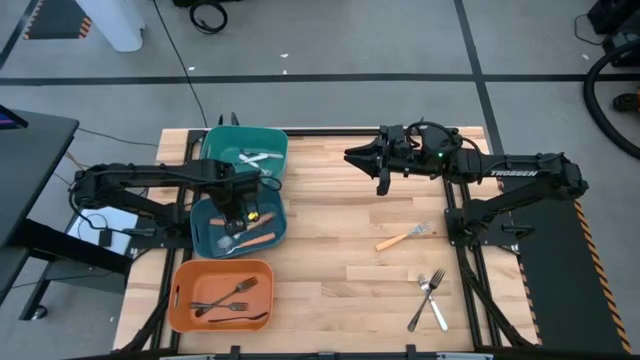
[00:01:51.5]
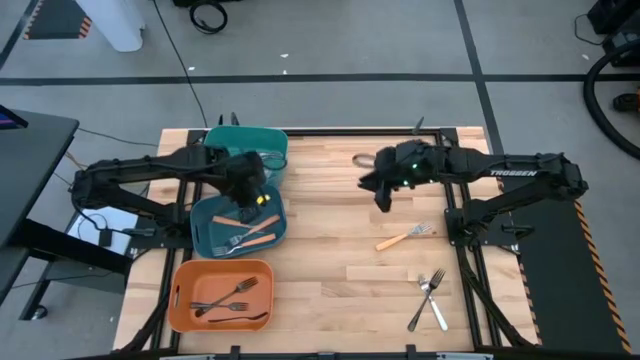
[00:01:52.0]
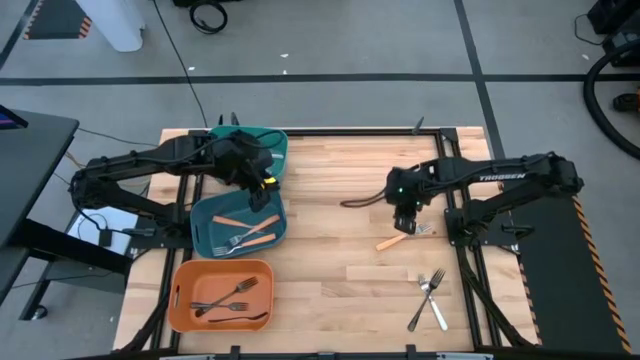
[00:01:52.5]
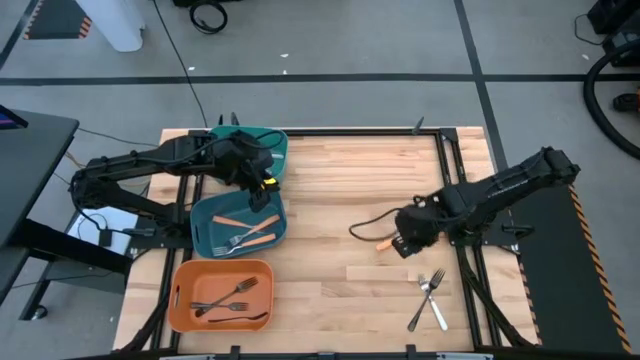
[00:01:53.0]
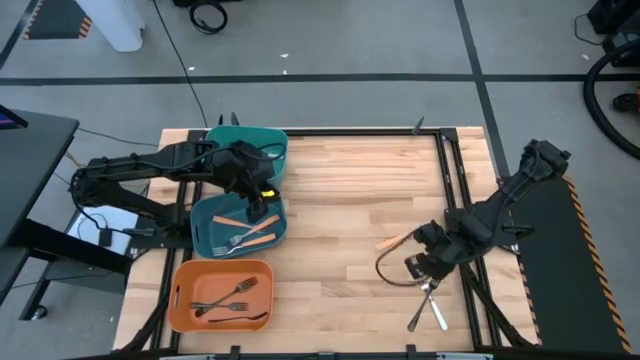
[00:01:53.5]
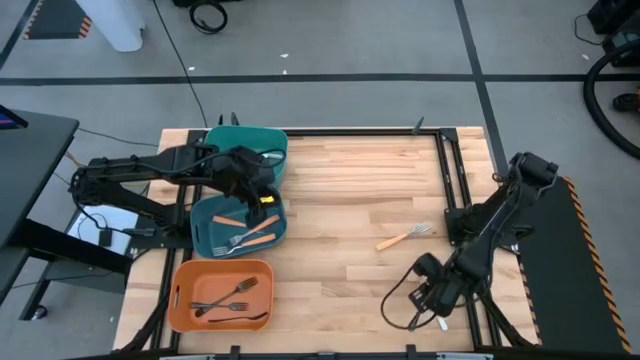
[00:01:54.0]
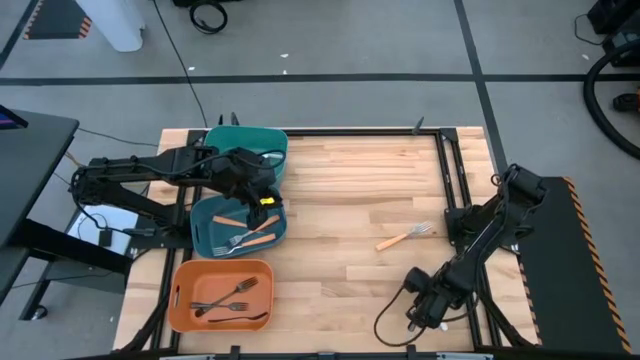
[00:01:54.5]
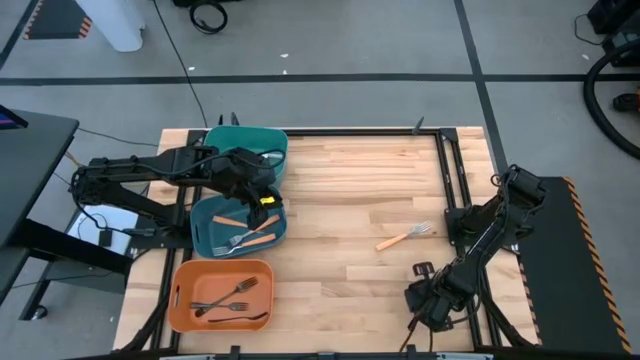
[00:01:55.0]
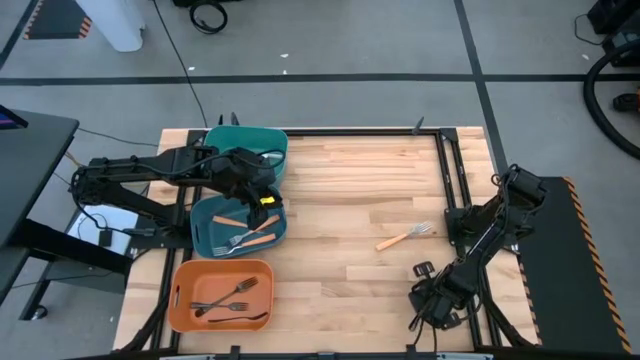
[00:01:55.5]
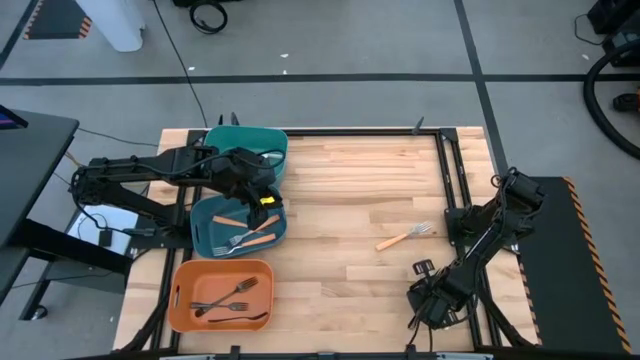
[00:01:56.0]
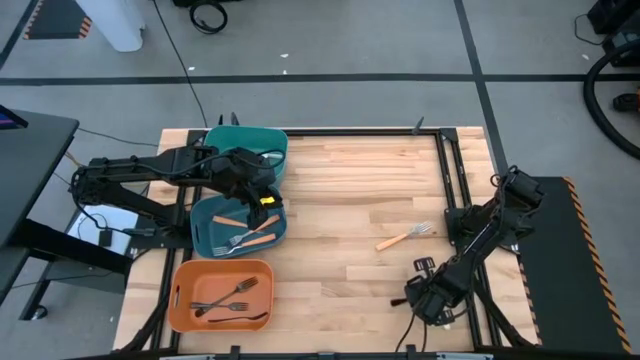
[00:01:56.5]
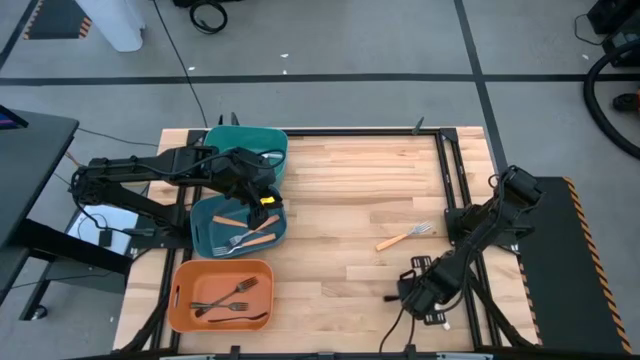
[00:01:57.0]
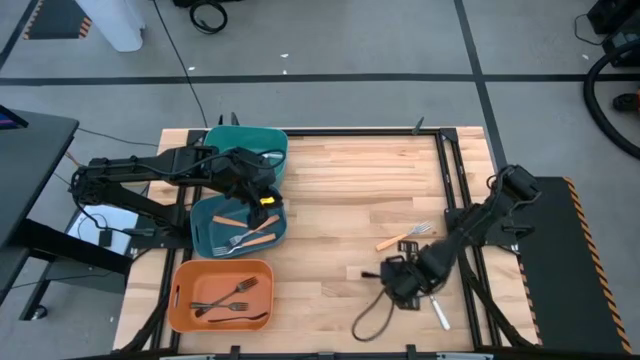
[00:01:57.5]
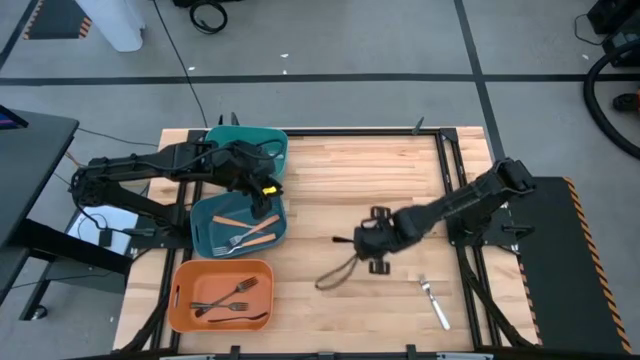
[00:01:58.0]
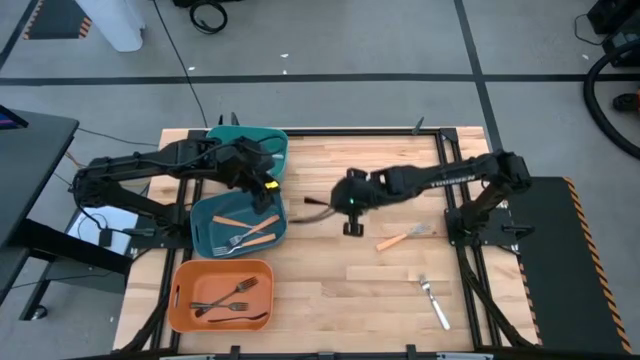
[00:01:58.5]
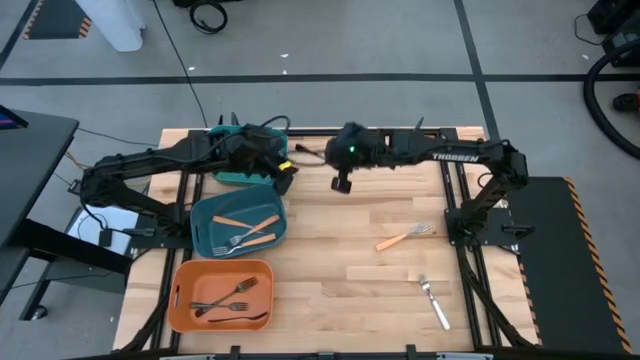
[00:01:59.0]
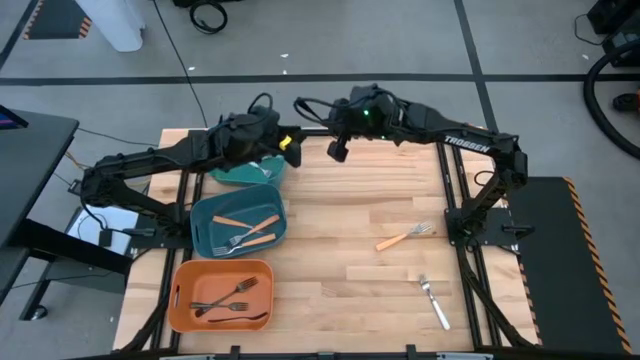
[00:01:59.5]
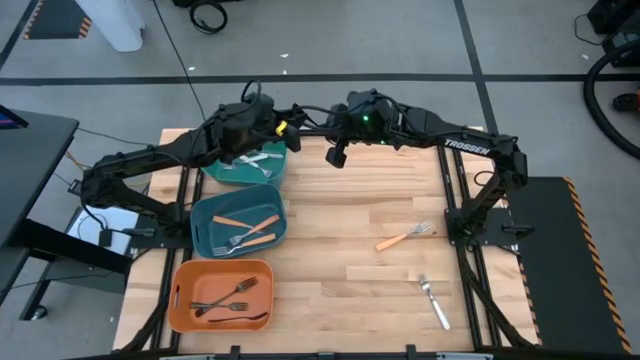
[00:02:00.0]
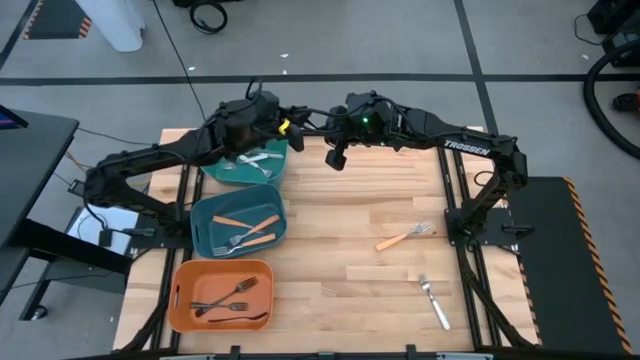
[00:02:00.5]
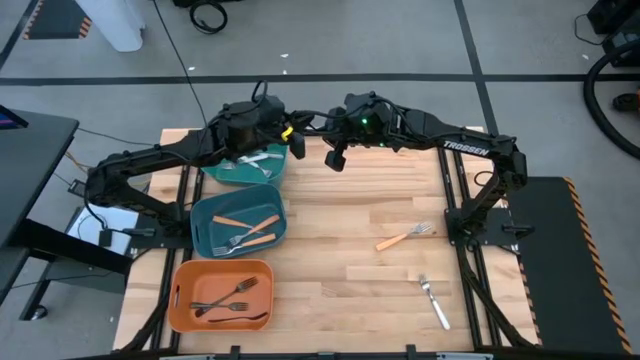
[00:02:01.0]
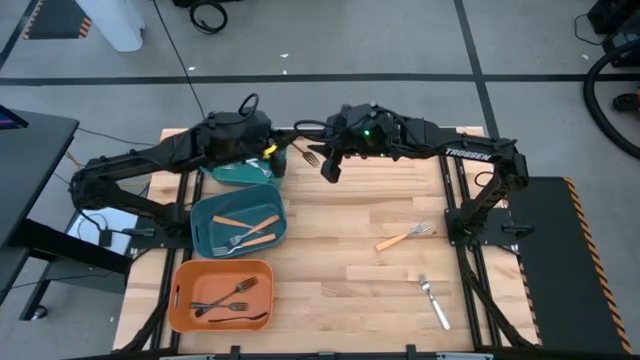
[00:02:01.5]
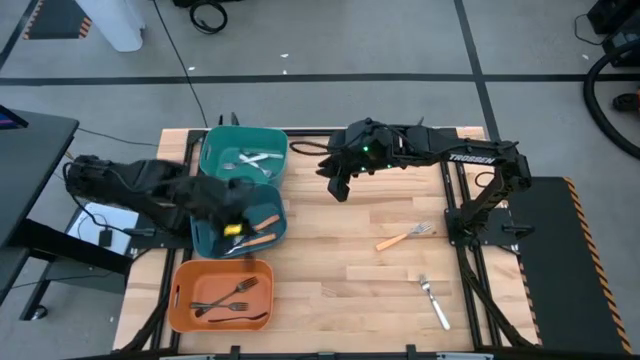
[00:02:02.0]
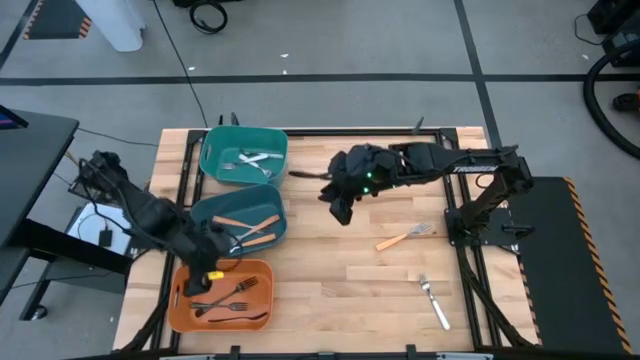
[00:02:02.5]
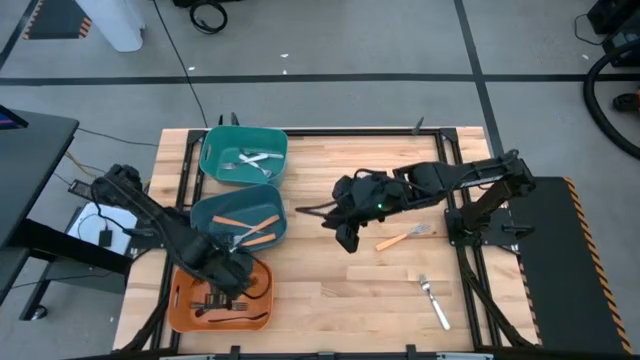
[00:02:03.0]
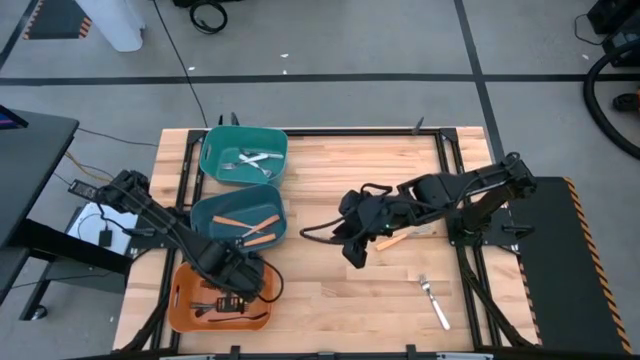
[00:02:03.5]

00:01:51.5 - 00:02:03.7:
Task: Sort silverware by color (type)
Put the black fork into the orange bin

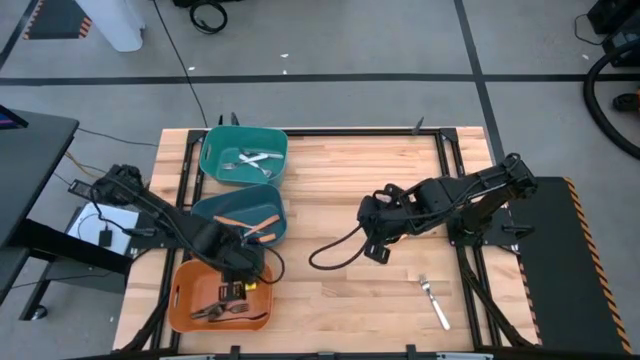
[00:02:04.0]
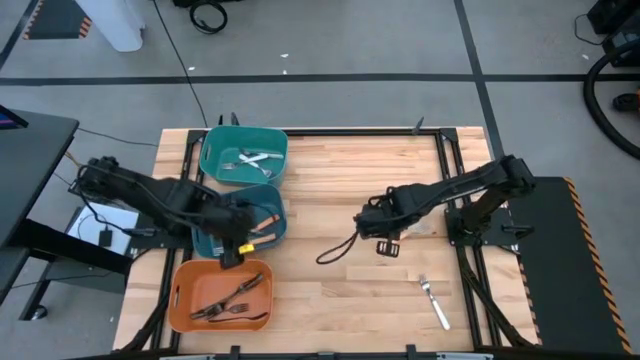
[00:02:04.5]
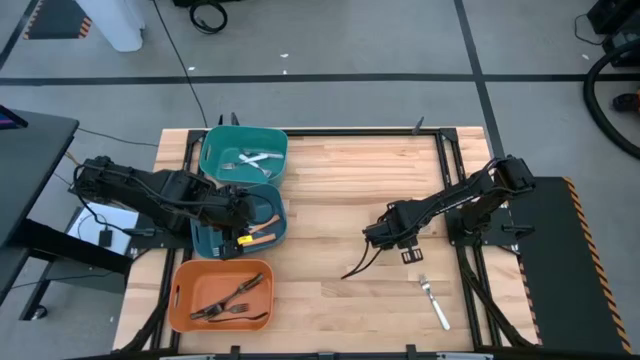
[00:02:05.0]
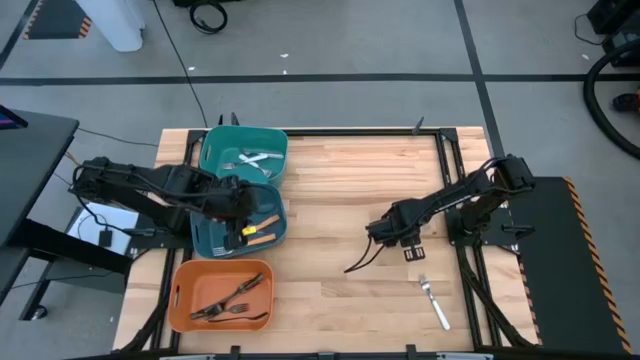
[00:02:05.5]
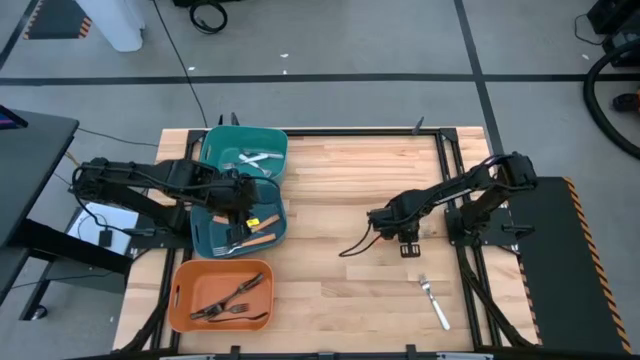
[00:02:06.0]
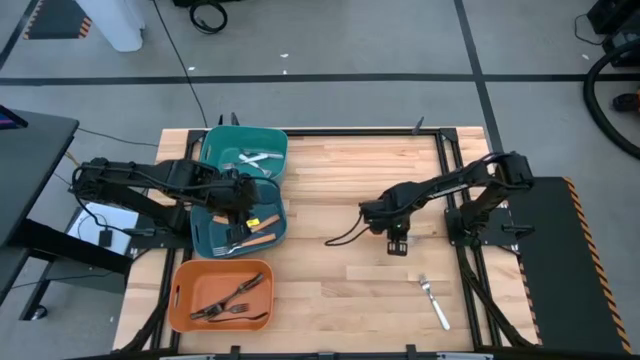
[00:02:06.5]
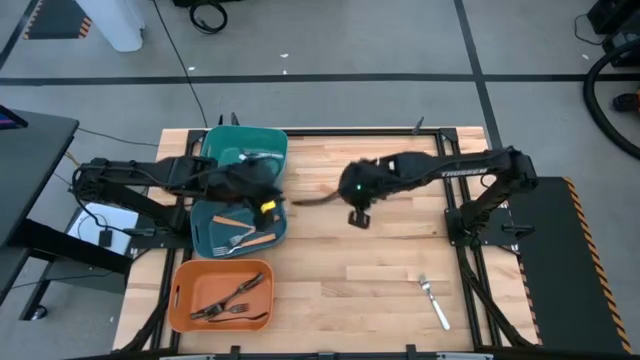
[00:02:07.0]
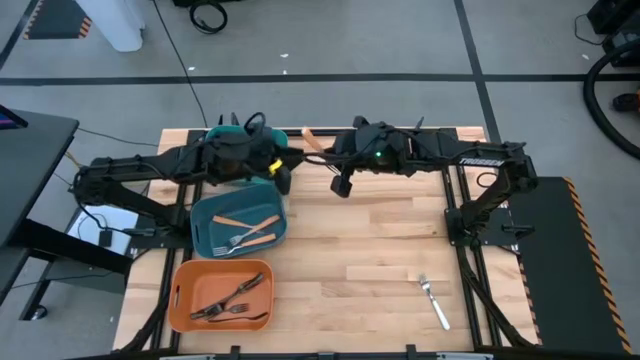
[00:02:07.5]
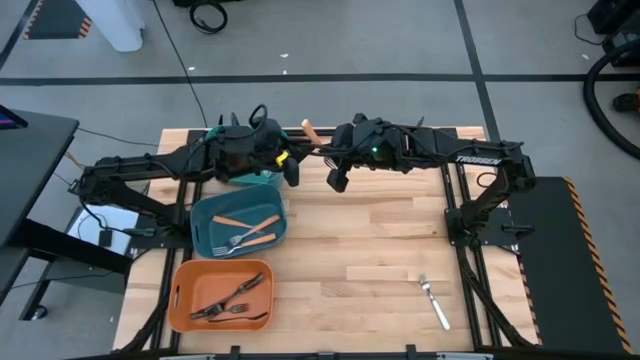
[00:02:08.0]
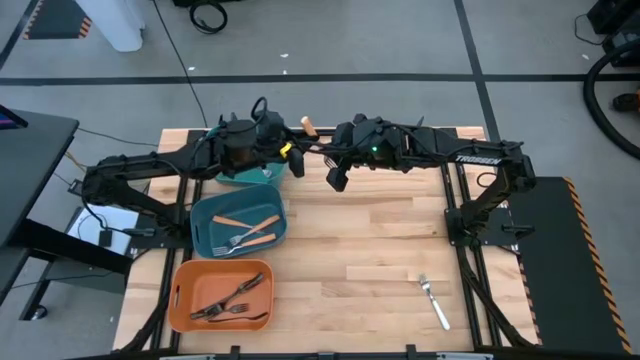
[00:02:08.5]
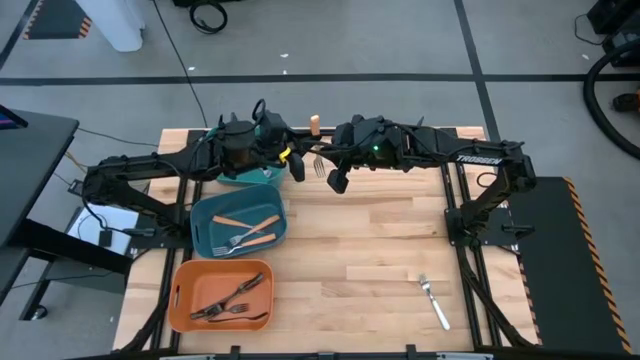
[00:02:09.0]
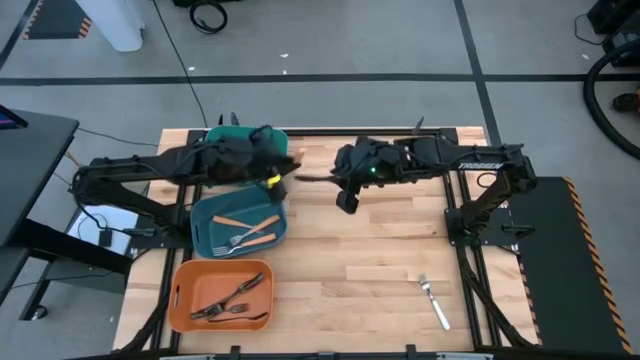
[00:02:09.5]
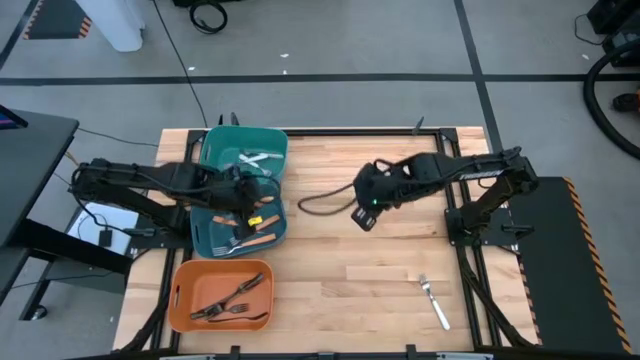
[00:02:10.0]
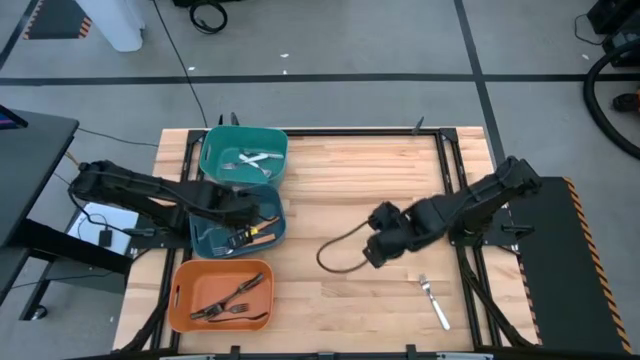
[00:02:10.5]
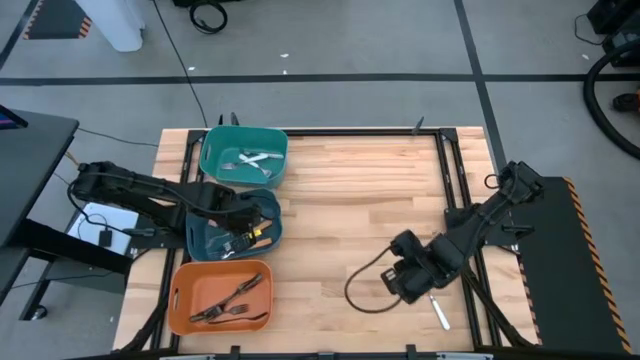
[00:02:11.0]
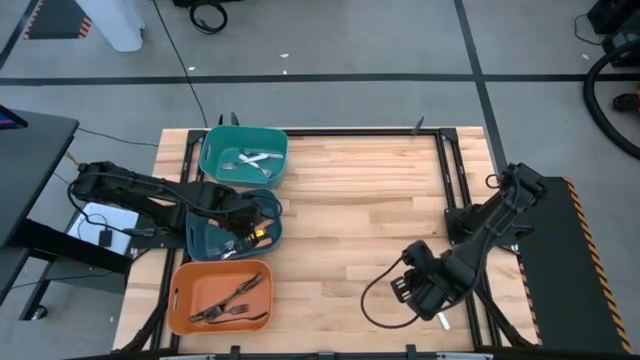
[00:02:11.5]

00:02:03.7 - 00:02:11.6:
Put the orange fork into the blue bin
